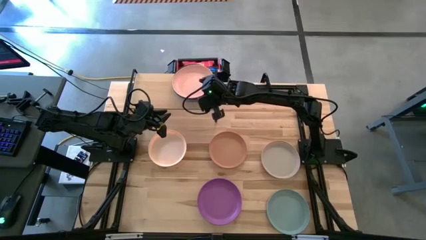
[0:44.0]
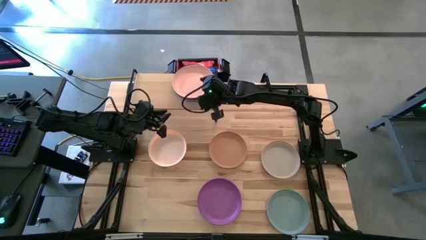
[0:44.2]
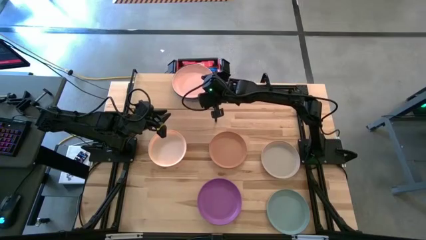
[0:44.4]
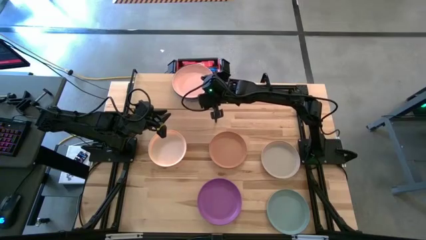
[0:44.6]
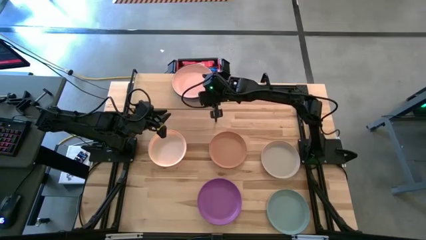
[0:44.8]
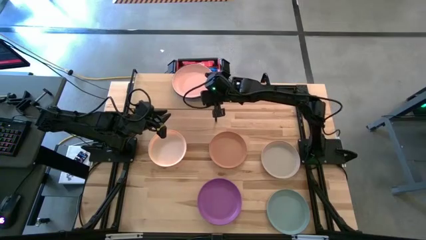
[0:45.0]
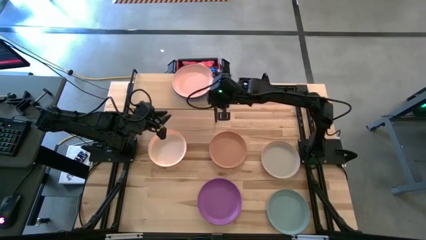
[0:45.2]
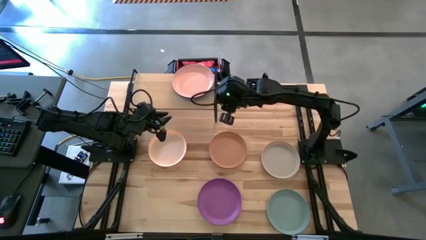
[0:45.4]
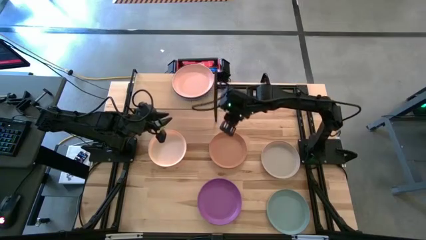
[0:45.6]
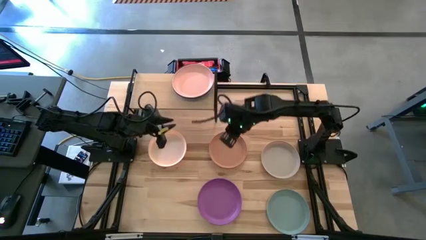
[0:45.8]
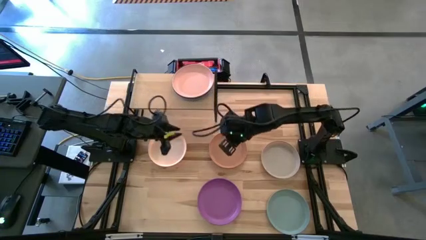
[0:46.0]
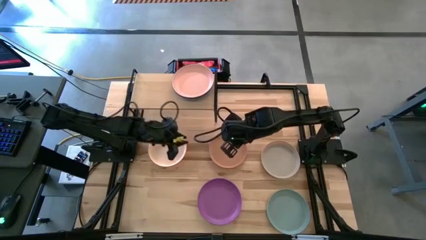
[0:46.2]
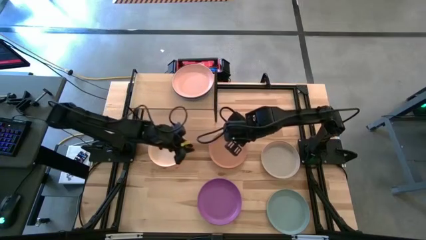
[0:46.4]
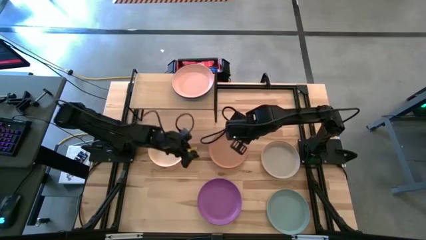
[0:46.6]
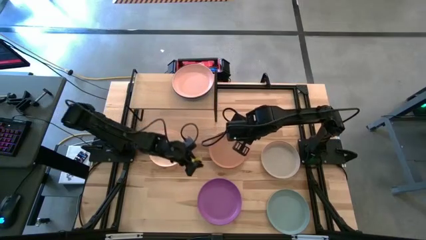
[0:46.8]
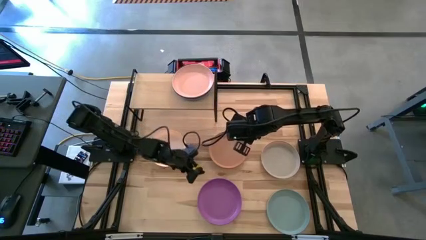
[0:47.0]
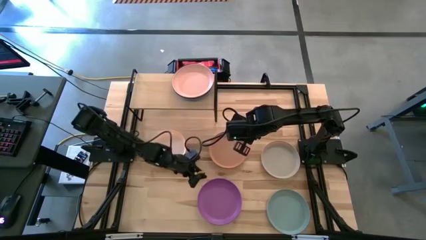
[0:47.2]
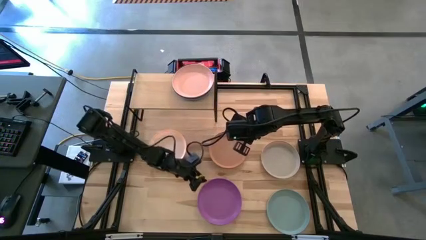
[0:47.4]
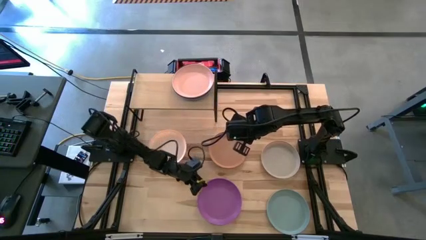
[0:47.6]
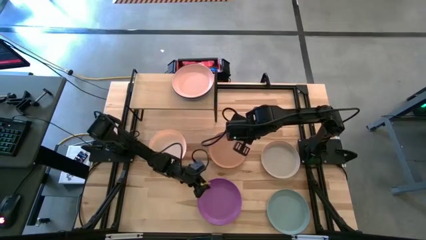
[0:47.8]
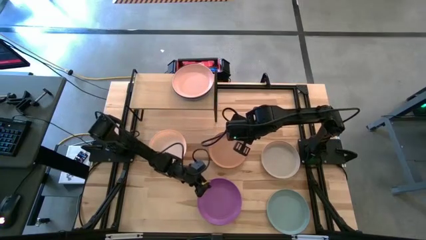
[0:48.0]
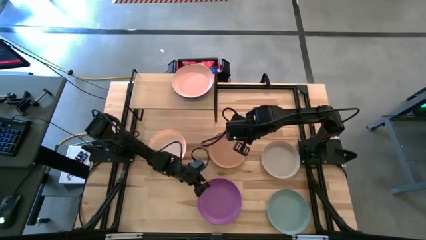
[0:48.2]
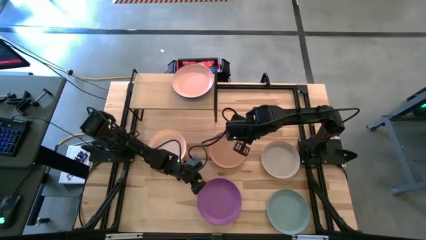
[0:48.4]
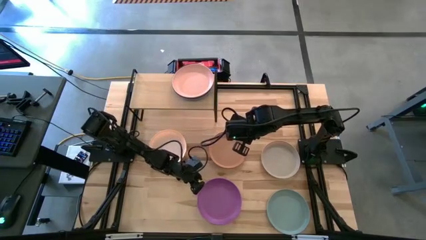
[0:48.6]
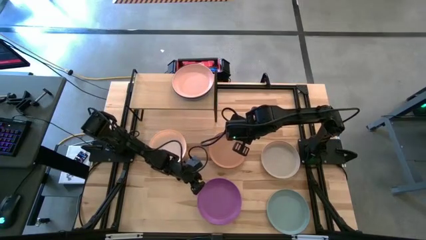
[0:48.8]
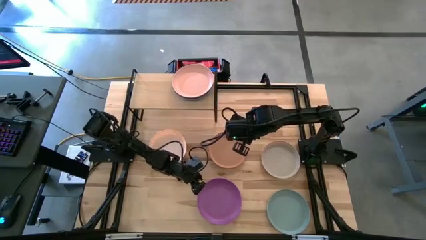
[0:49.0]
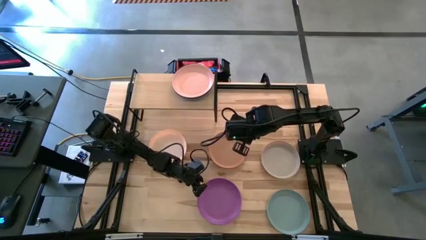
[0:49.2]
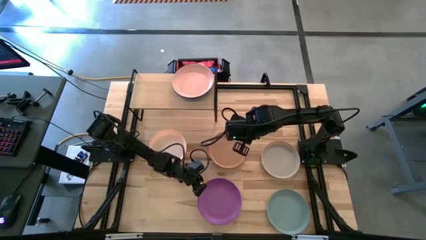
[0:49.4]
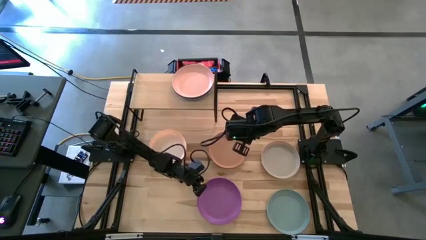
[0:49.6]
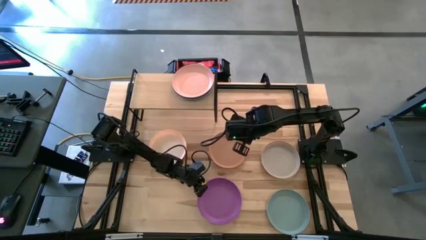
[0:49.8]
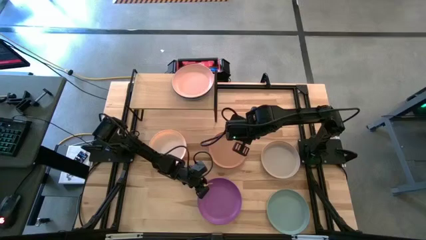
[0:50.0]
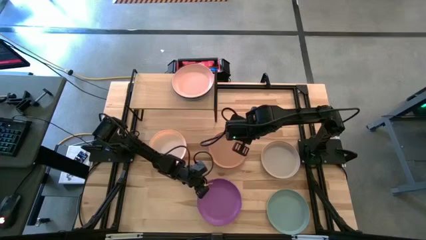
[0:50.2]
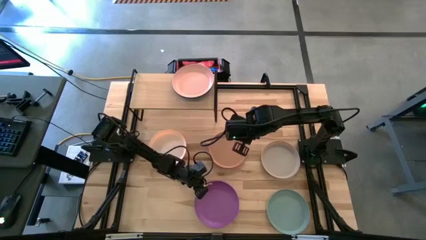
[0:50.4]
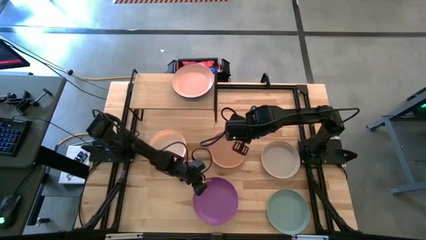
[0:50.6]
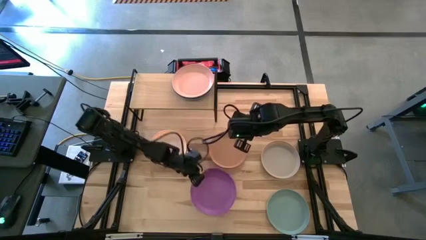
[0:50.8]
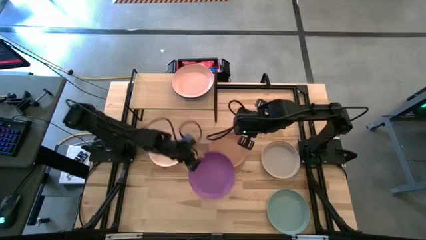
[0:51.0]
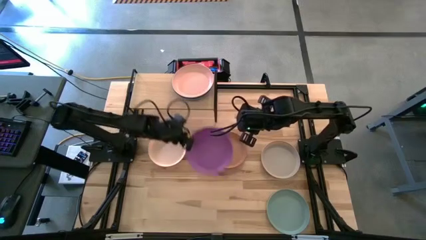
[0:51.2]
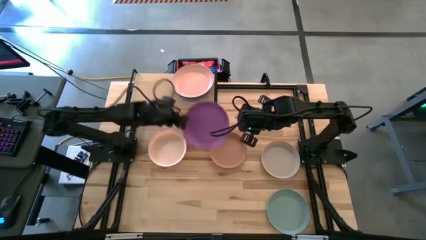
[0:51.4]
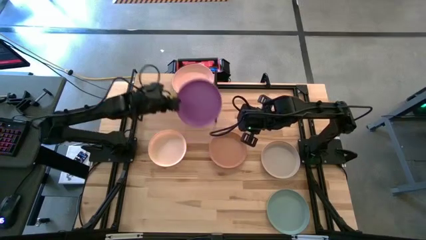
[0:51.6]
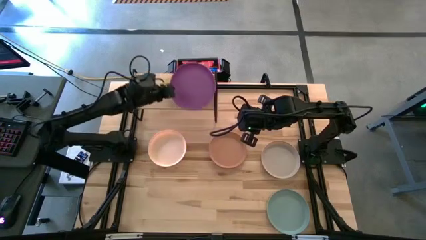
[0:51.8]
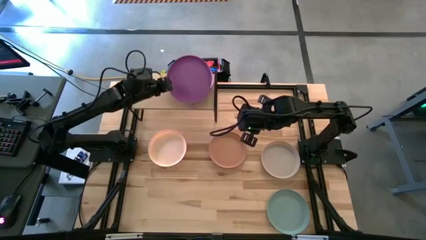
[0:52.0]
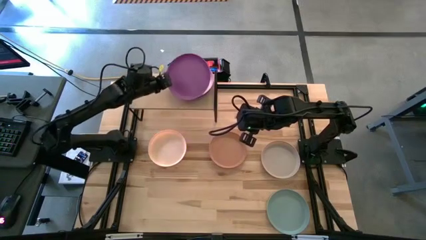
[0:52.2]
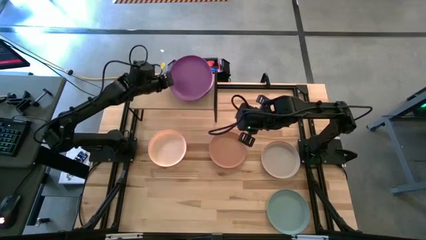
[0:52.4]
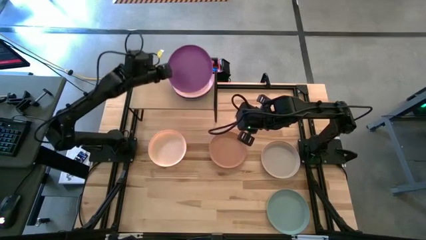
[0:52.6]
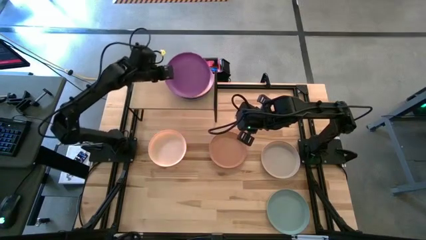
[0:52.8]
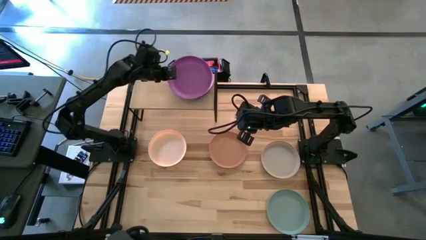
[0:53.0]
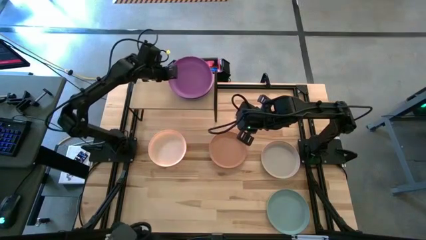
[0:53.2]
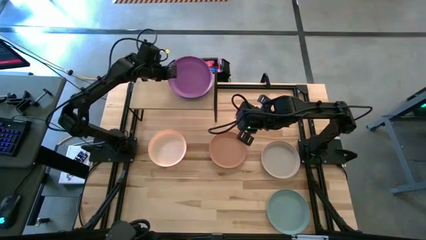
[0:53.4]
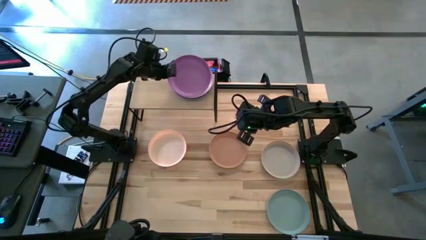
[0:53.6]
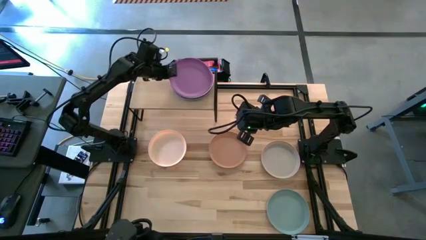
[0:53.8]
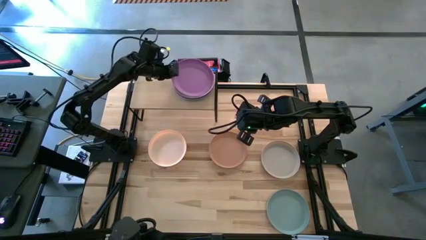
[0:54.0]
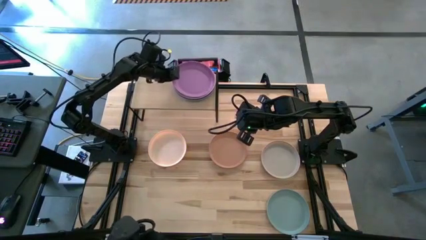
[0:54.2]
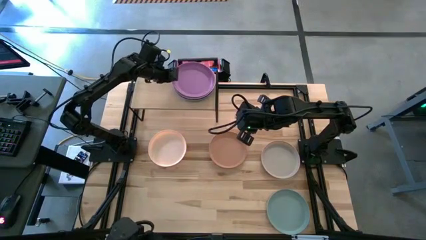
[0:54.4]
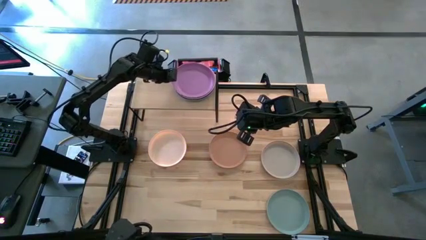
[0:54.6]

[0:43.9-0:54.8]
Task: Place and stack plates onto a shelf
Stack the violet plate on top of the light pink plate on the shelf

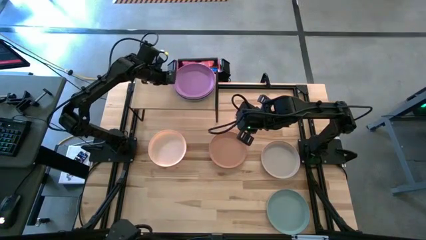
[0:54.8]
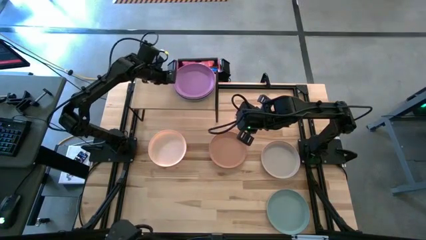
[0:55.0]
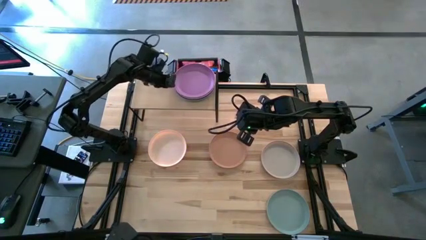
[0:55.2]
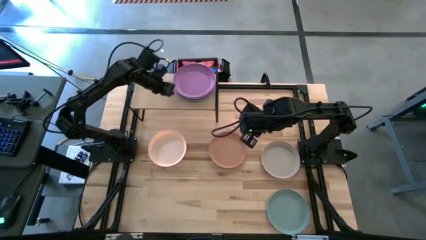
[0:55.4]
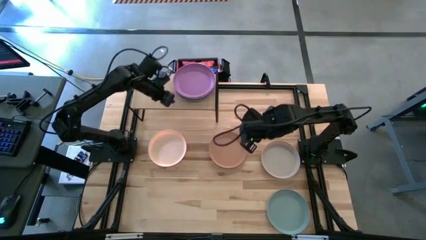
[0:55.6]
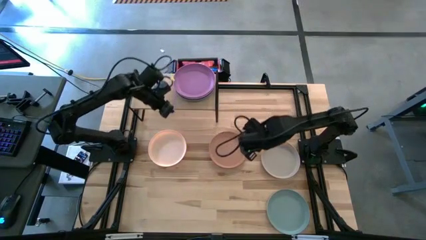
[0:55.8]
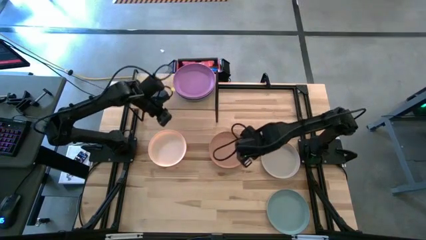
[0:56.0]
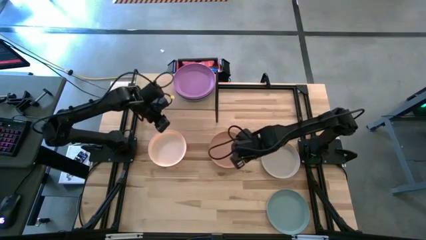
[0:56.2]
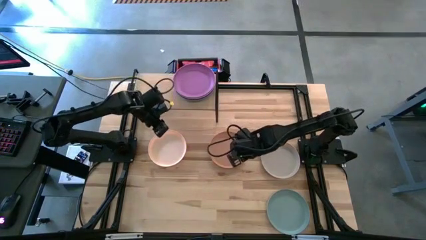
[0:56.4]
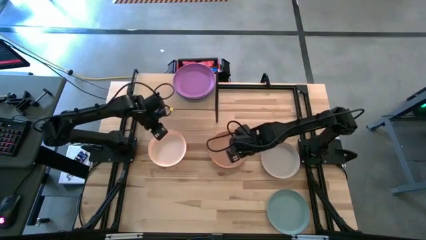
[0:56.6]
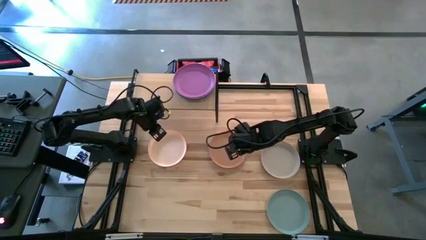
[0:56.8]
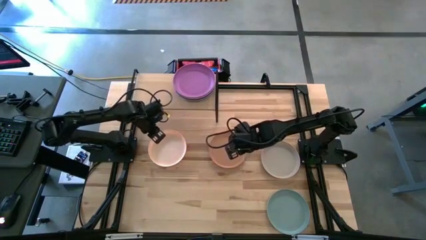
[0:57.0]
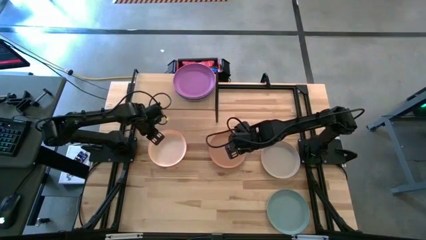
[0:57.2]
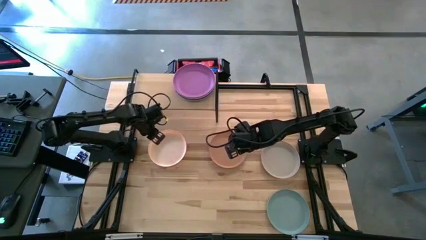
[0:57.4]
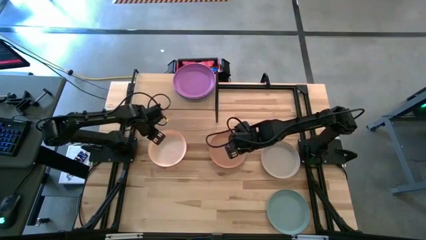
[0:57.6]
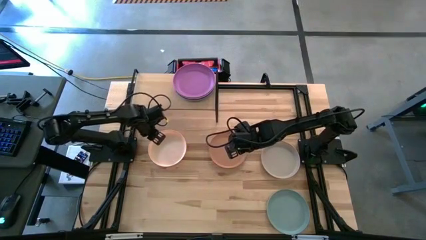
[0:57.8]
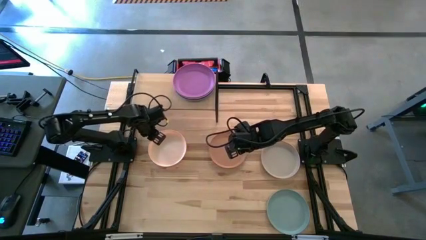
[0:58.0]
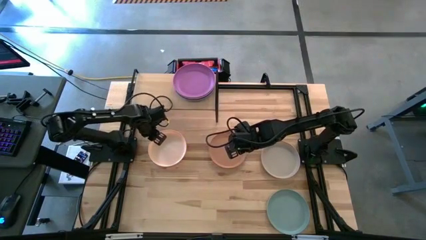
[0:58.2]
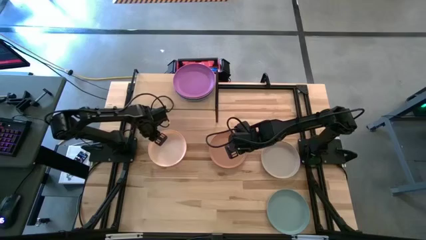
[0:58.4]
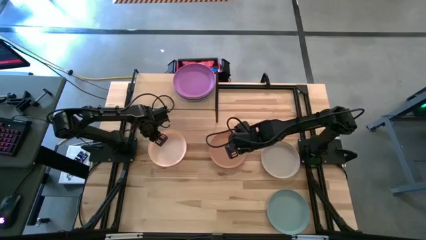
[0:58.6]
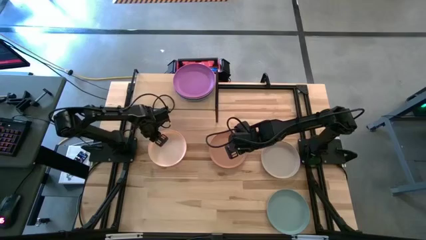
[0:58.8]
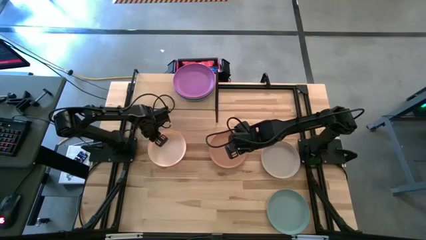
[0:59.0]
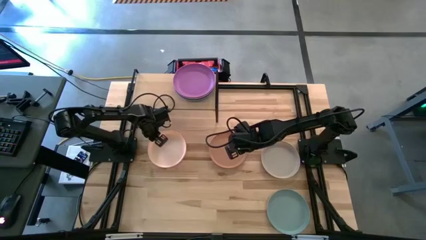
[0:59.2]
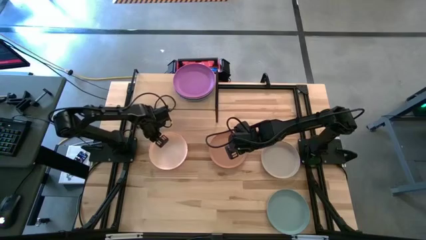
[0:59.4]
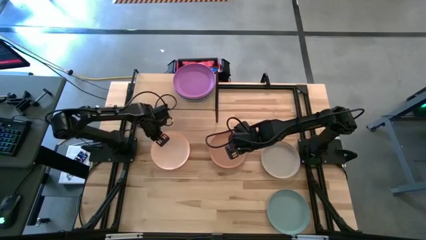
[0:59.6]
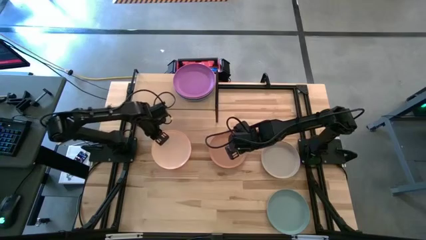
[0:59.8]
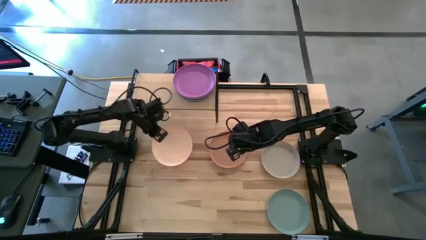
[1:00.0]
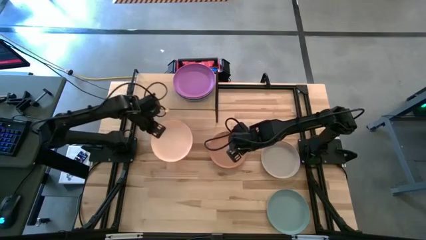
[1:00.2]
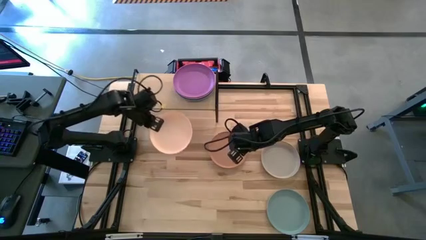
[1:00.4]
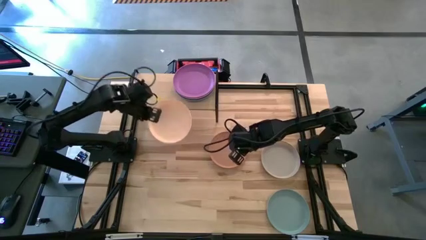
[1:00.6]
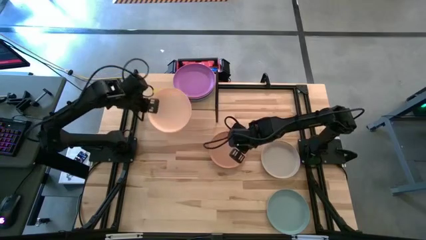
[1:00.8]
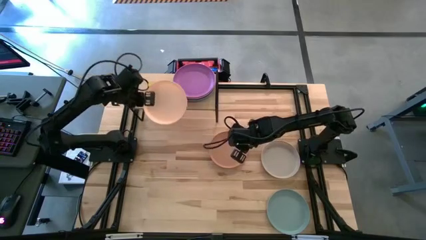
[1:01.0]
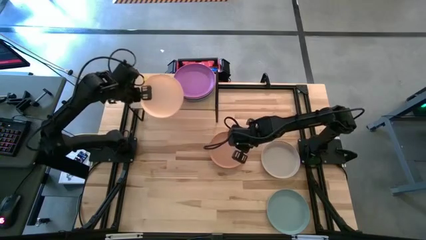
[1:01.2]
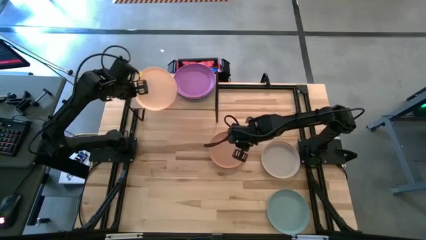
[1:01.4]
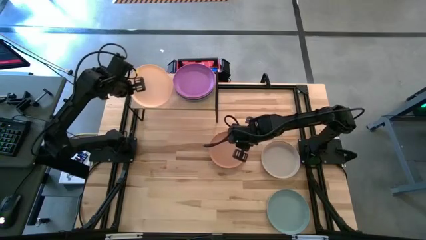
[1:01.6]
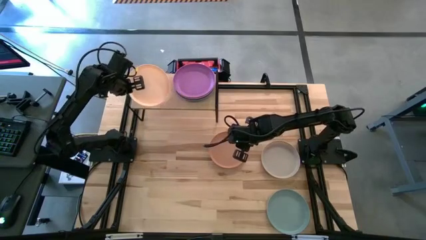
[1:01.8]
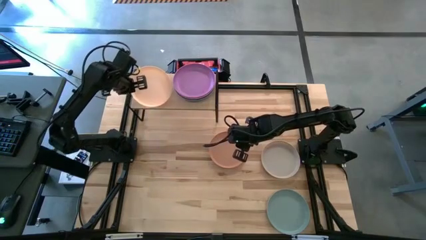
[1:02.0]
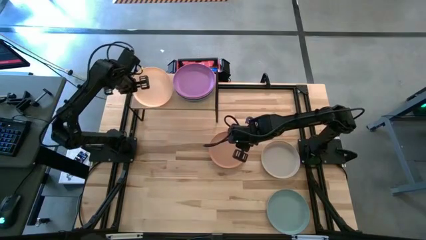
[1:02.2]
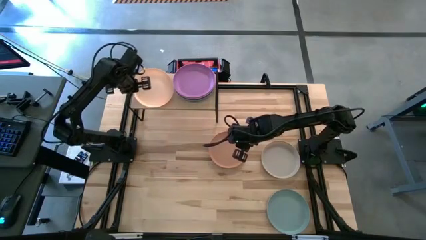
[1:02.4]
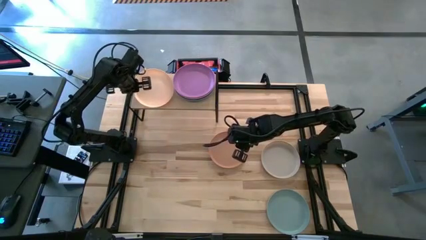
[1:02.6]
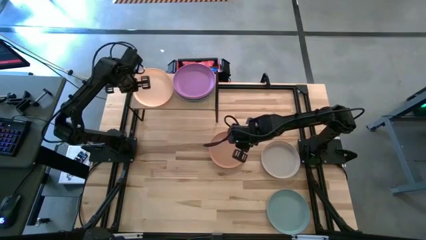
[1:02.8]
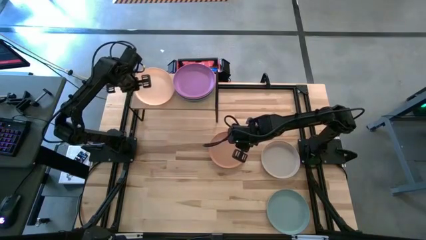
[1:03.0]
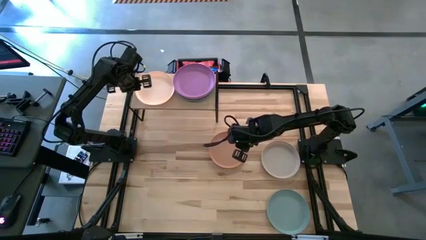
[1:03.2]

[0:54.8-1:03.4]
Put the light pink plate on the shelf
